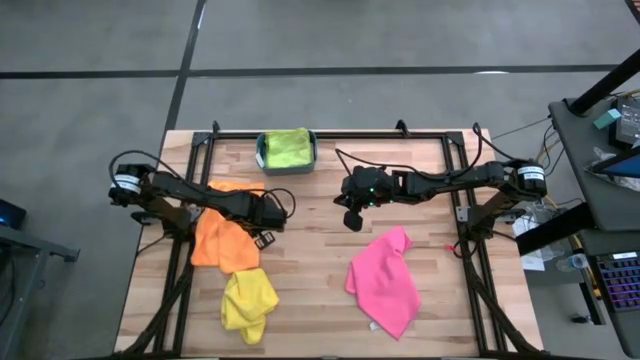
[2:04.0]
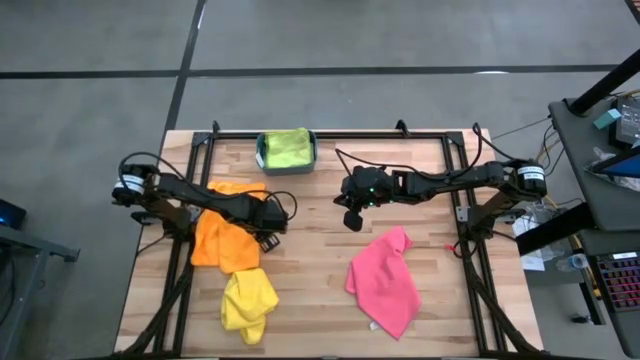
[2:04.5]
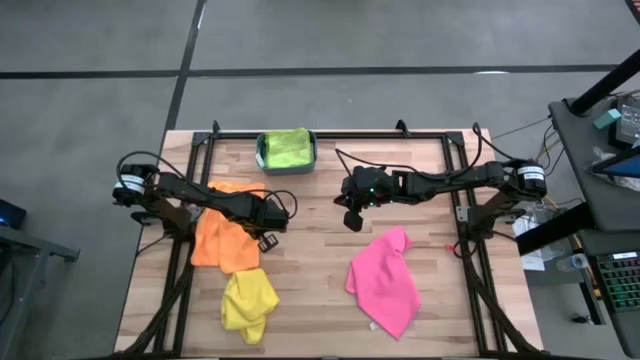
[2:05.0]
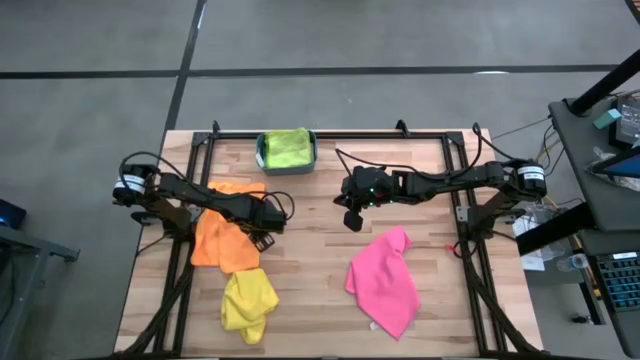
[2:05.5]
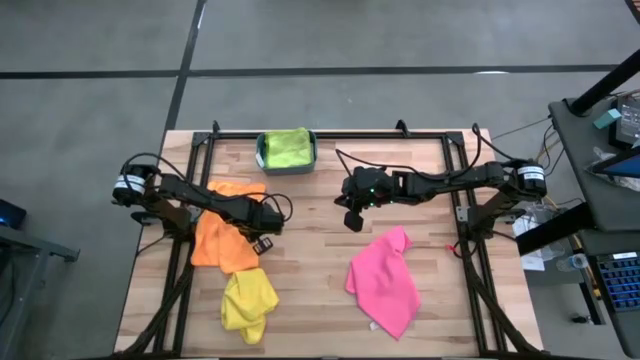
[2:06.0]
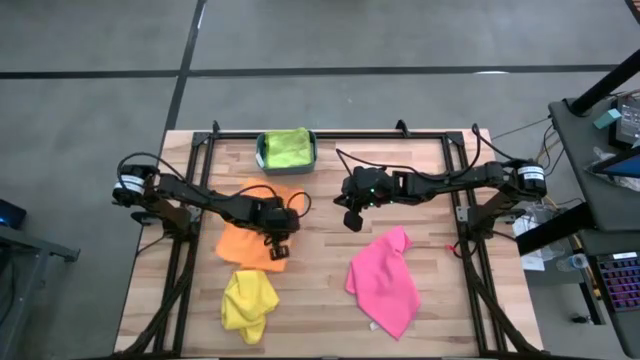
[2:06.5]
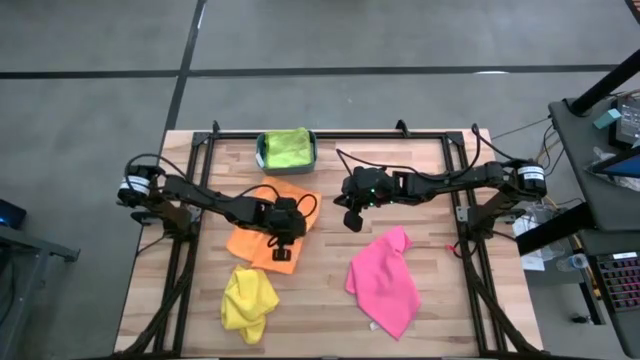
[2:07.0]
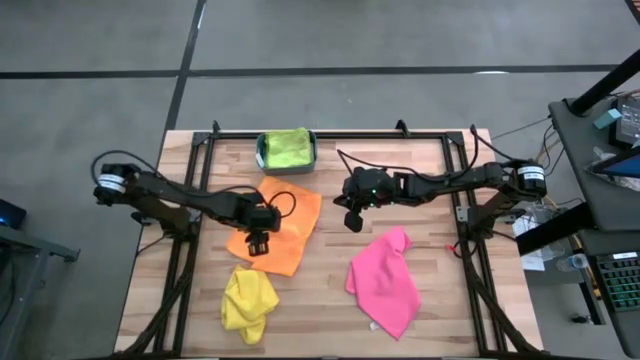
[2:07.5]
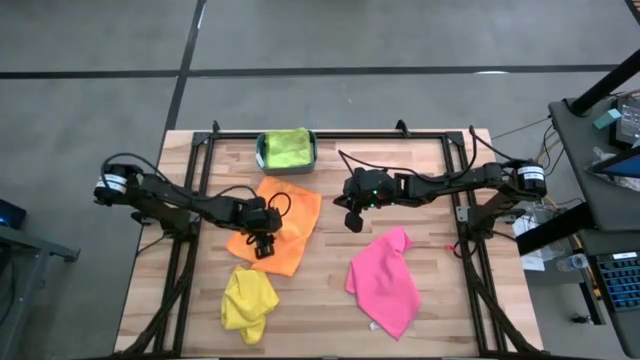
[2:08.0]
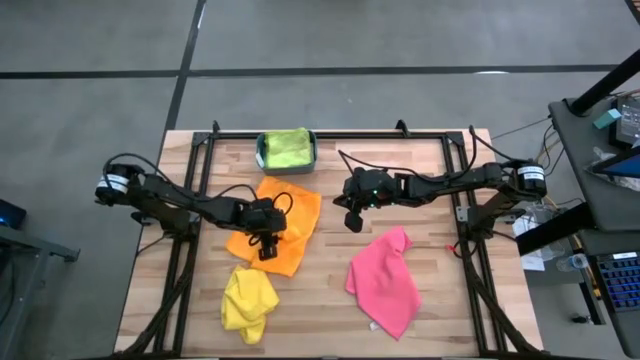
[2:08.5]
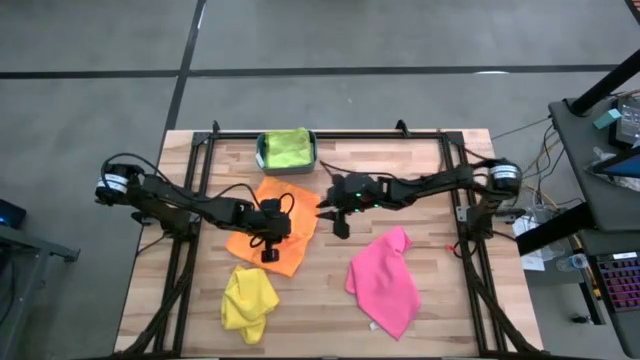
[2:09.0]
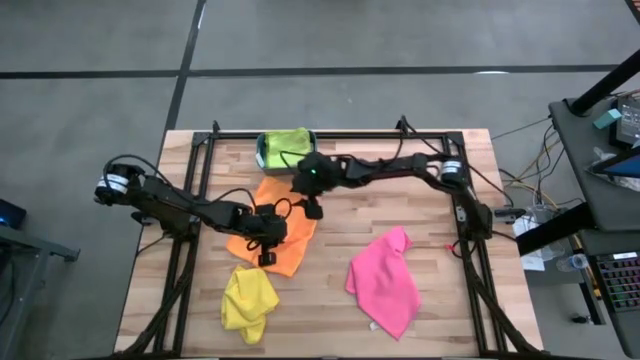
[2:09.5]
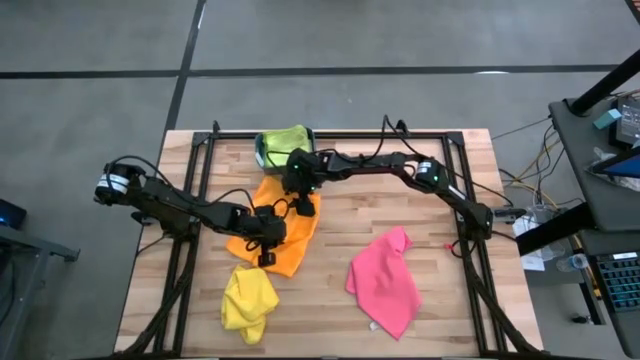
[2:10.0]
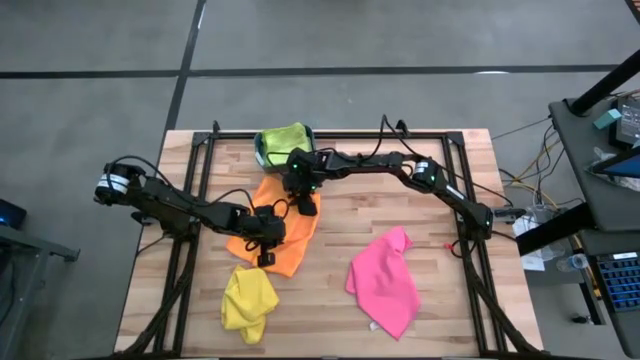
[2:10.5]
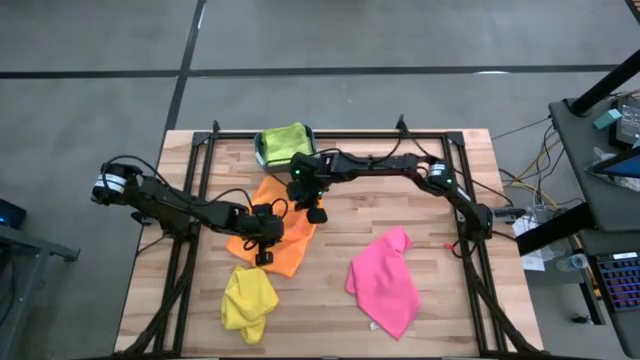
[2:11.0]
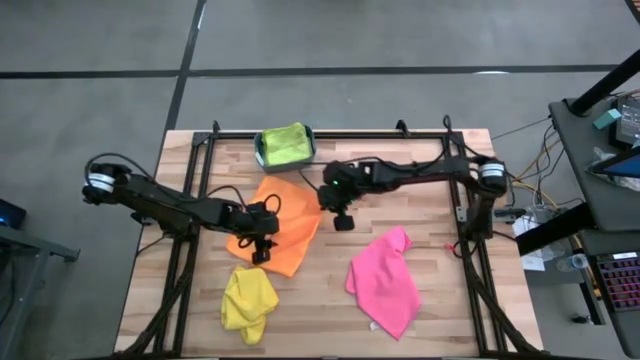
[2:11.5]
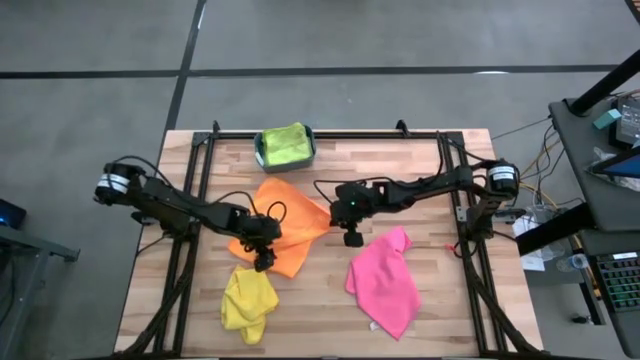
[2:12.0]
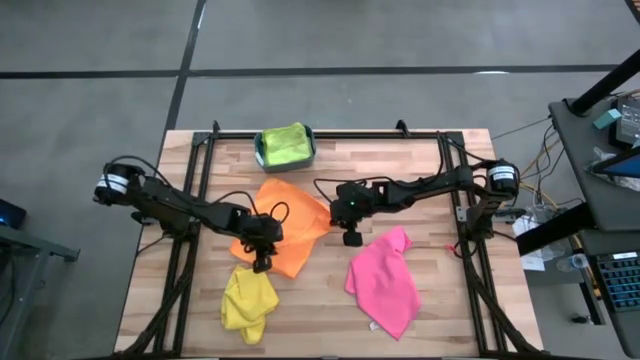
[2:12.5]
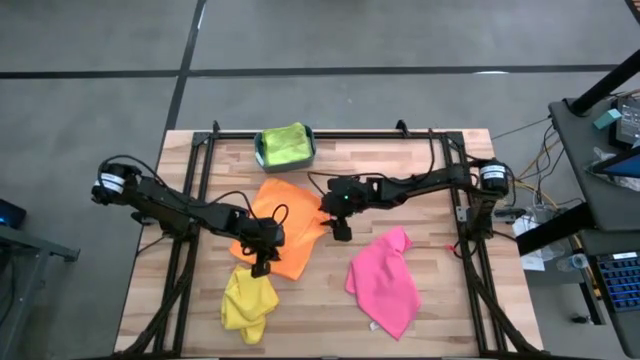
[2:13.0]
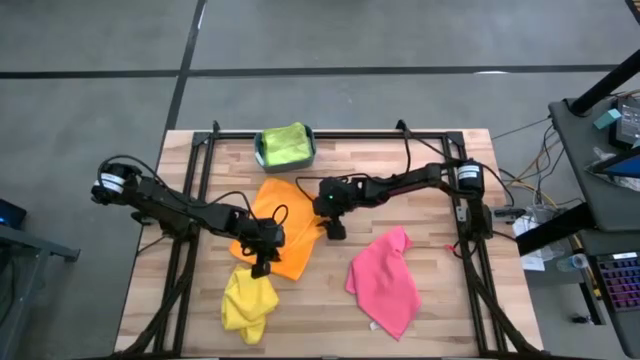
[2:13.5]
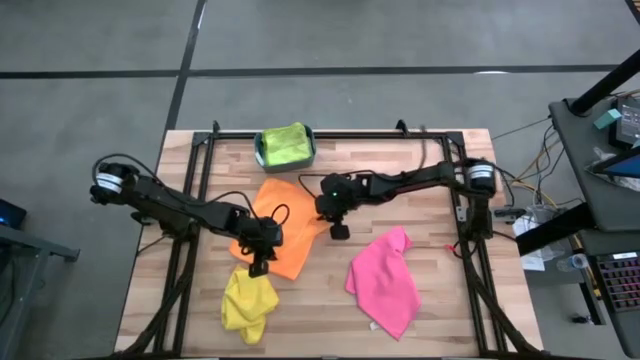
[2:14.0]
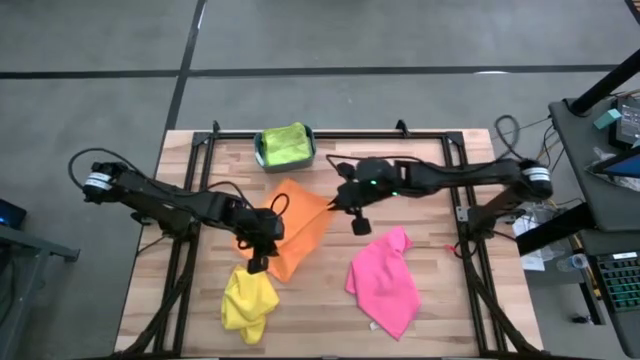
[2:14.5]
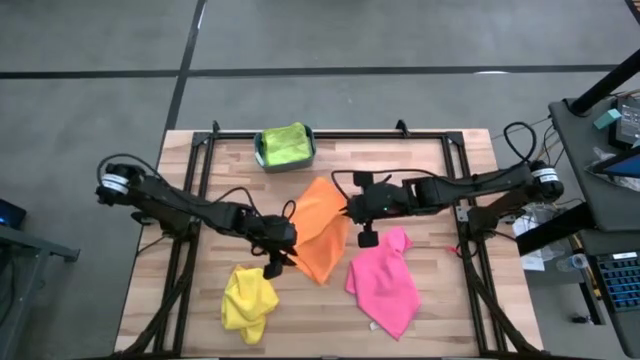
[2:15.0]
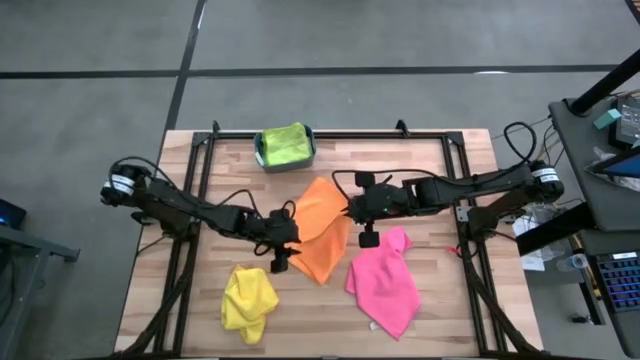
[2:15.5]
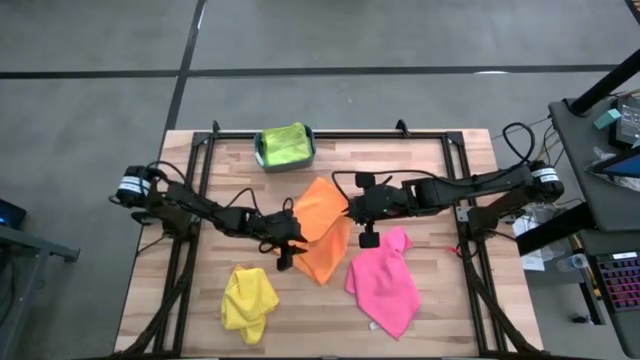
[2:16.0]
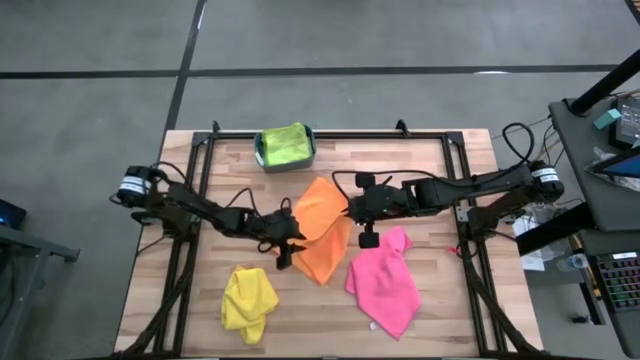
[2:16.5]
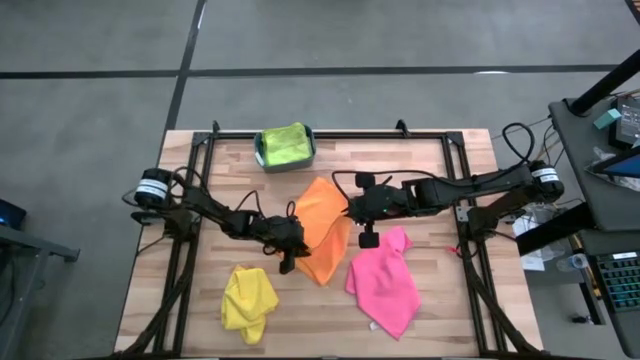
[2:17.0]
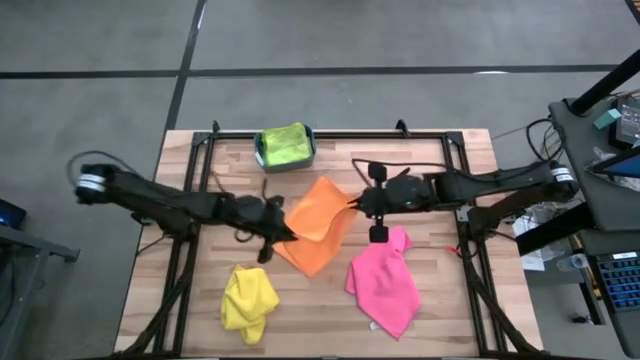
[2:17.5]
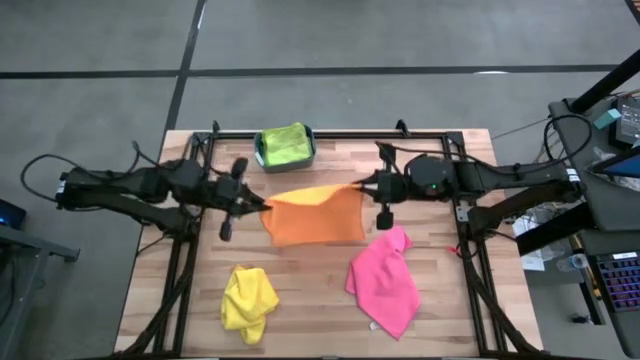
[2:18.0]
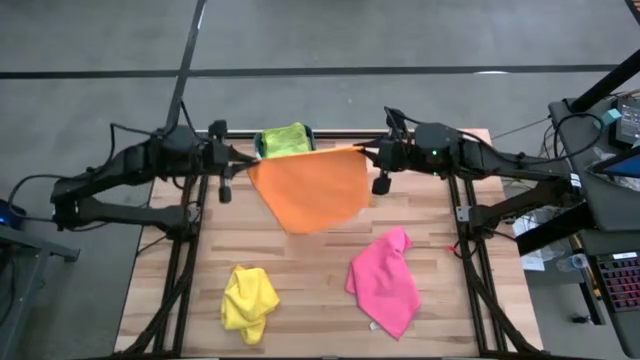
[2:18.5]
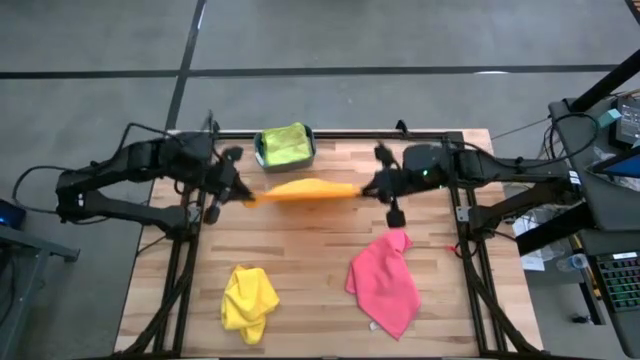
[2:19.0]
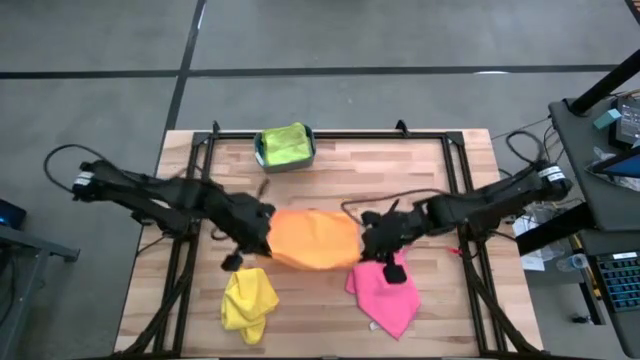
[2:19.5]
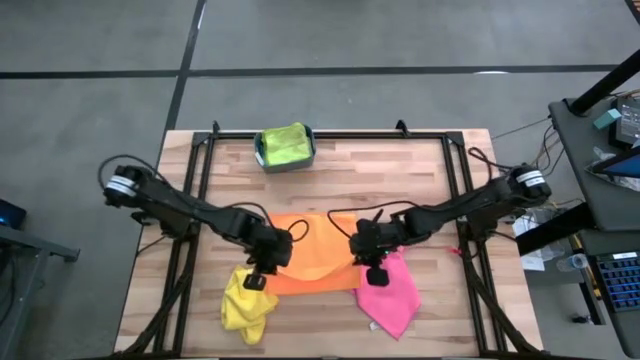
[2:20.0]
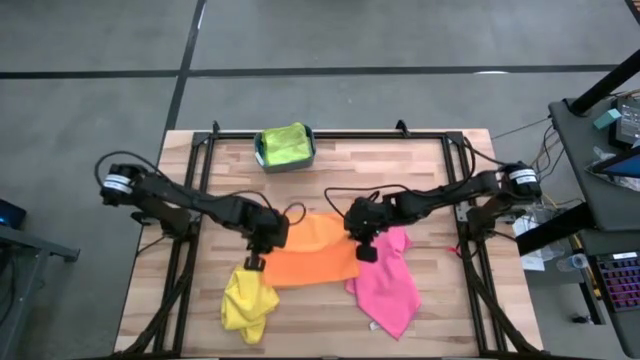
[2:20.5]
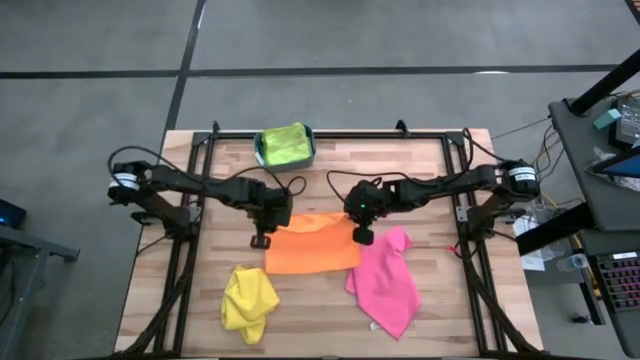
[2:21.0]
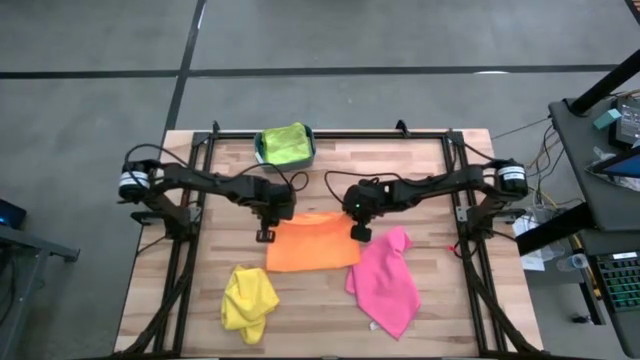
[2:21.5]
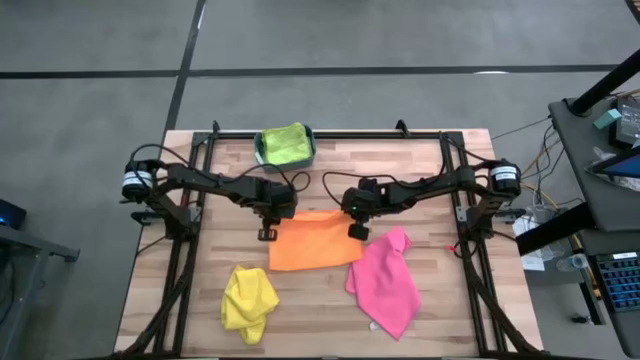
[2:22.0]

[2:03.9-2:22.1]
Task: Fold microfiber towels
Fold the orange towel

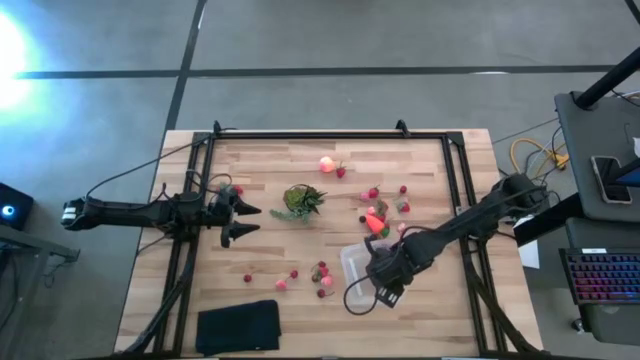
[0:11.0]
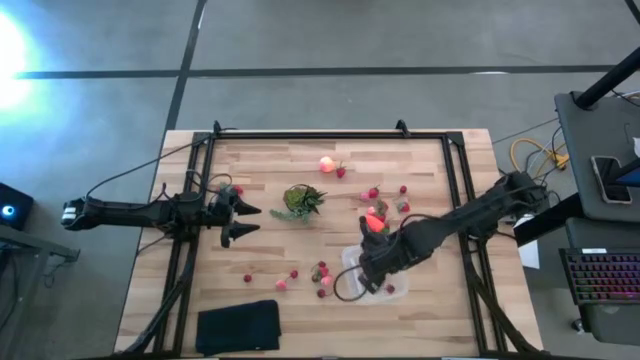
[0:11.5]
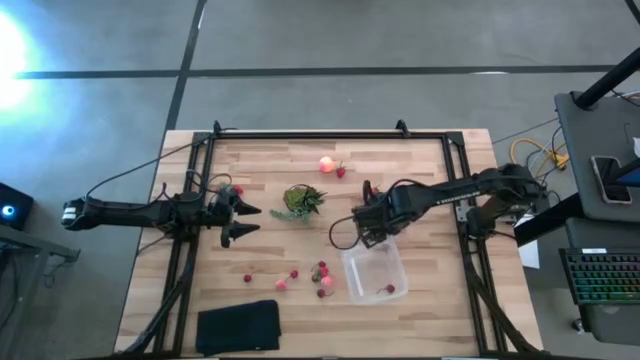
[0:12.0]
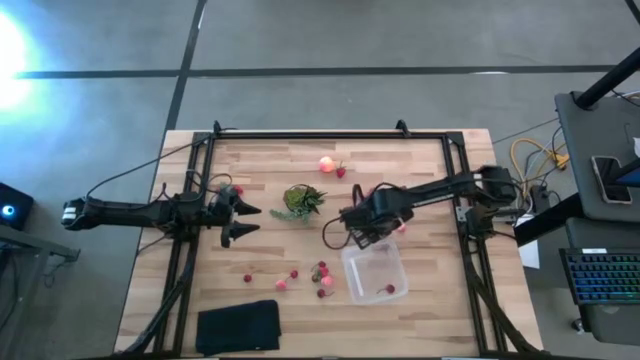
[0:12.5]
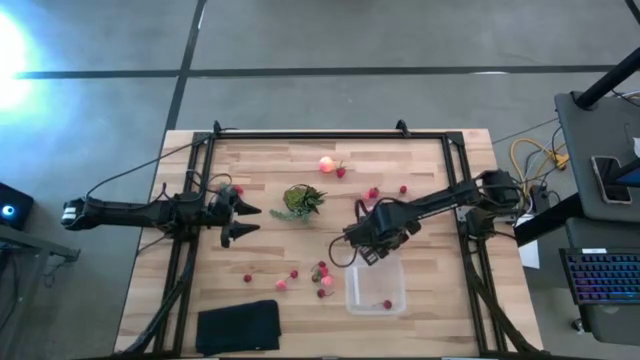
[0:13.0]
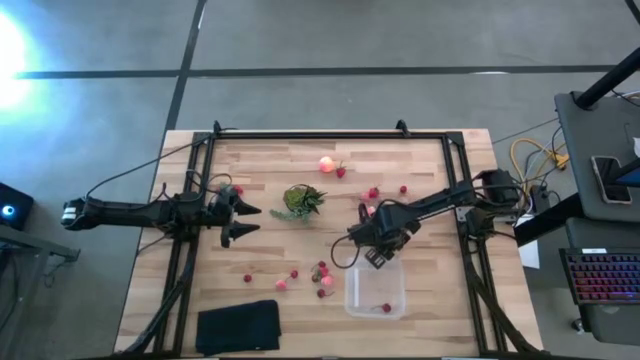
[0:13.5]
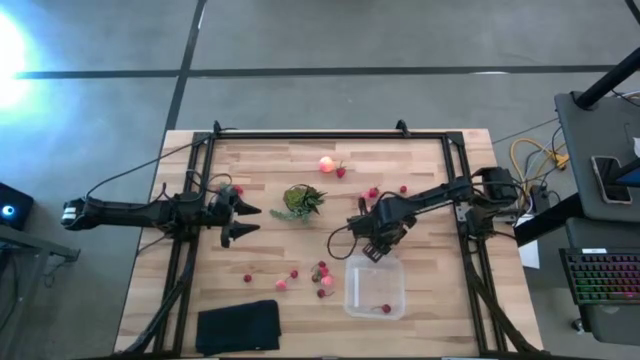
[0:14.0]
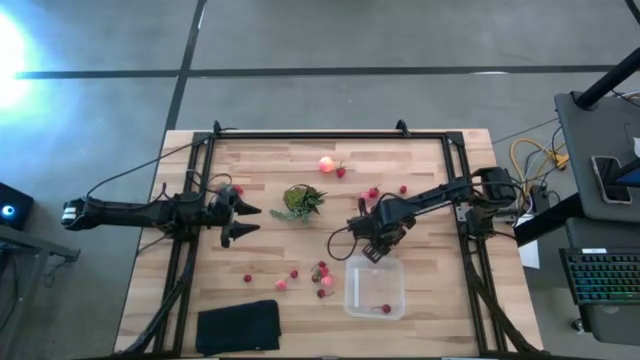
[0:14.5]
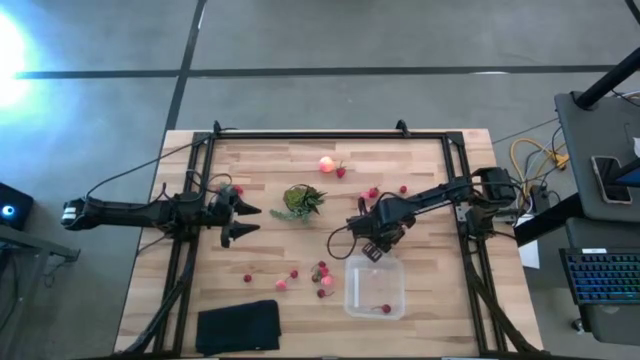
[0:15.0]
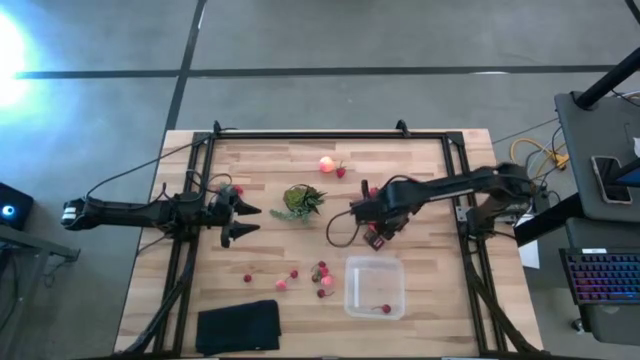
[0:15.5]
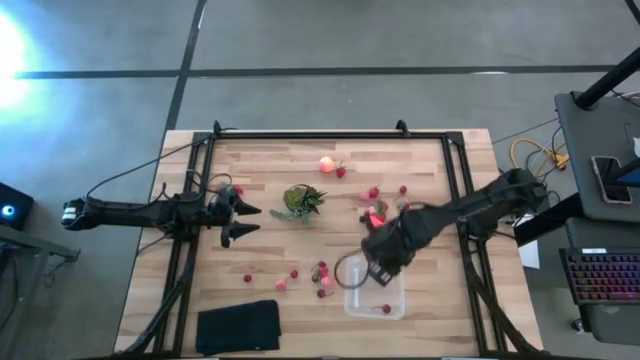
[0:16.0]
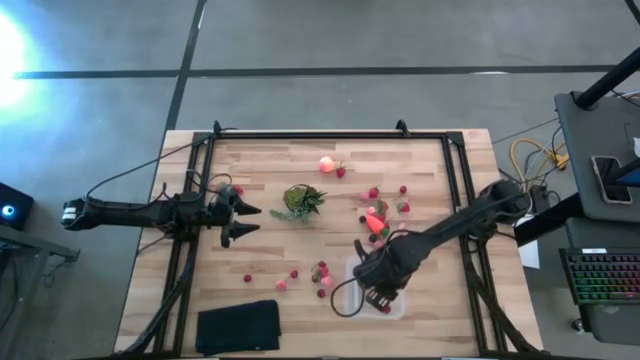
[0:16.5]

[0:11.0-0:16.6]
Task: Pick and placing Produce into tupperware
Put the cherry into the bin
